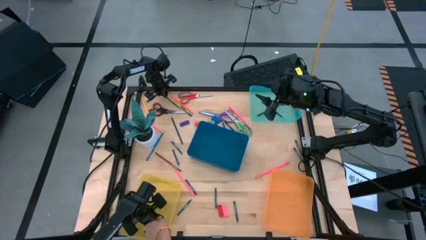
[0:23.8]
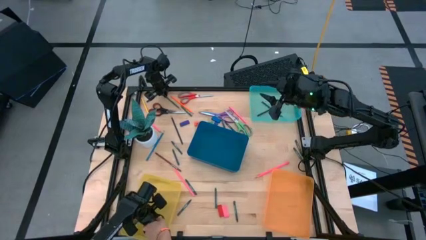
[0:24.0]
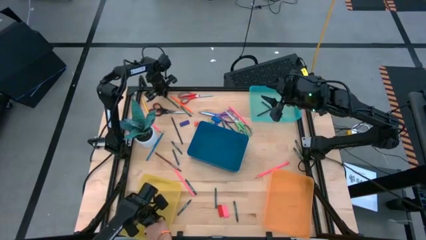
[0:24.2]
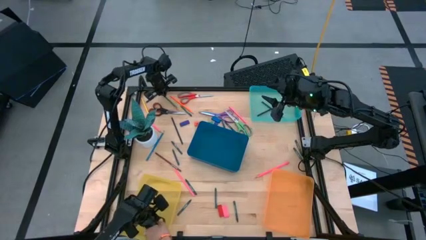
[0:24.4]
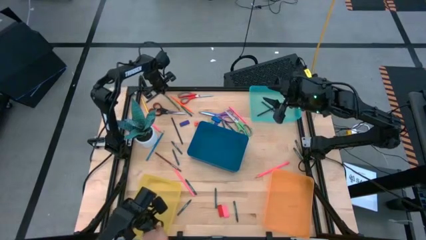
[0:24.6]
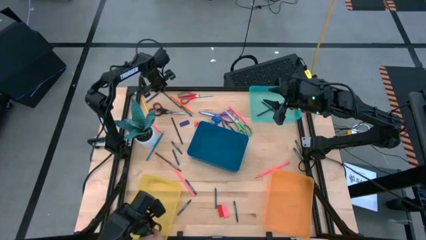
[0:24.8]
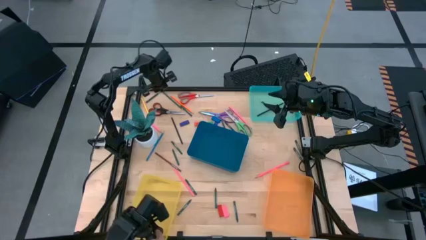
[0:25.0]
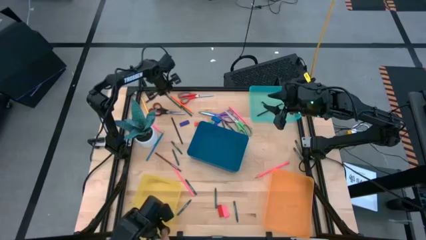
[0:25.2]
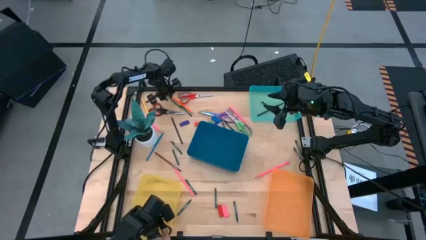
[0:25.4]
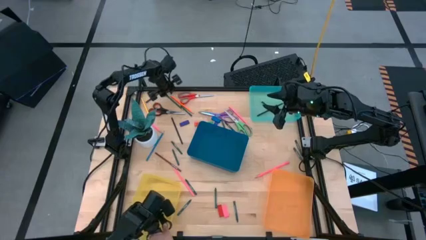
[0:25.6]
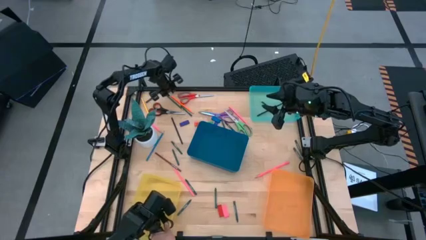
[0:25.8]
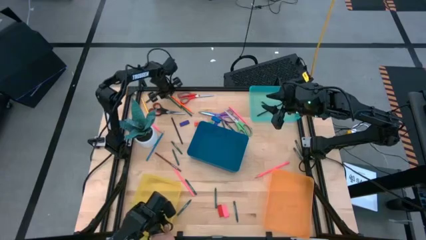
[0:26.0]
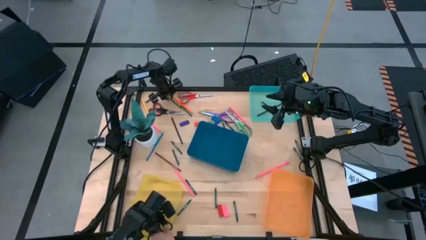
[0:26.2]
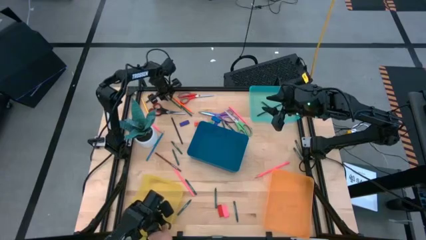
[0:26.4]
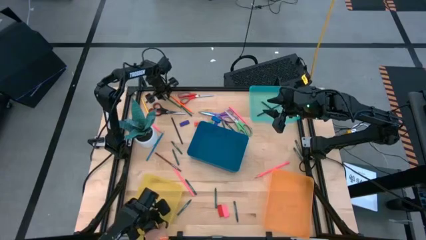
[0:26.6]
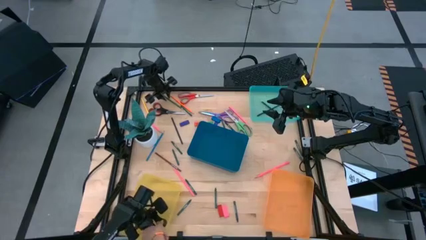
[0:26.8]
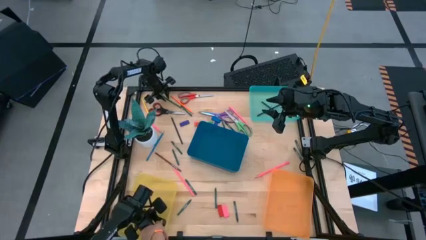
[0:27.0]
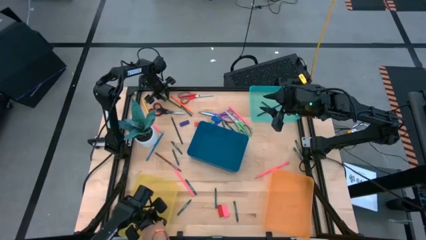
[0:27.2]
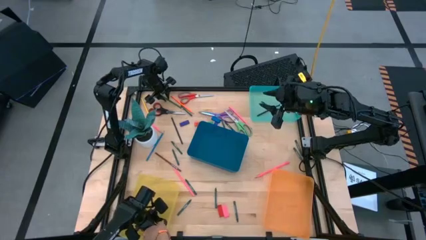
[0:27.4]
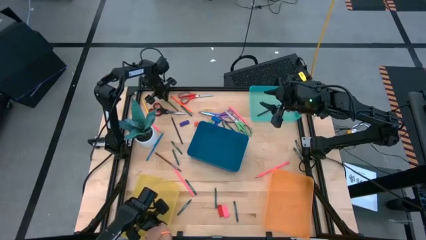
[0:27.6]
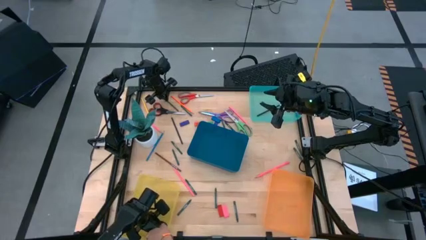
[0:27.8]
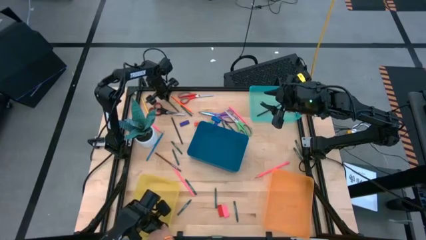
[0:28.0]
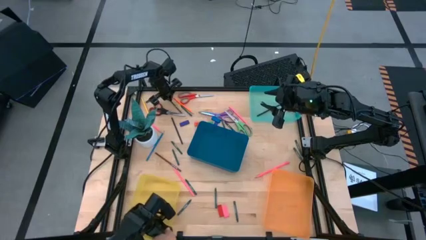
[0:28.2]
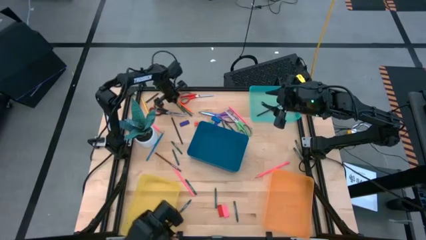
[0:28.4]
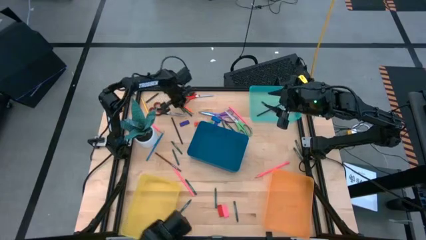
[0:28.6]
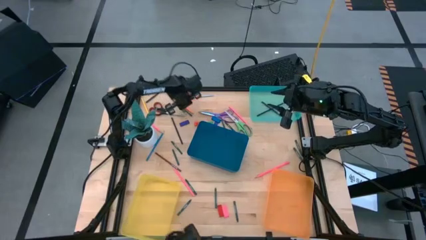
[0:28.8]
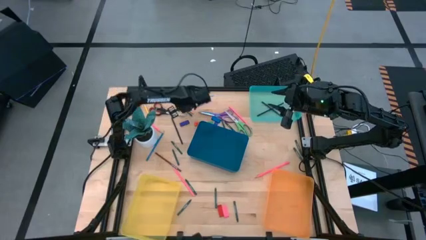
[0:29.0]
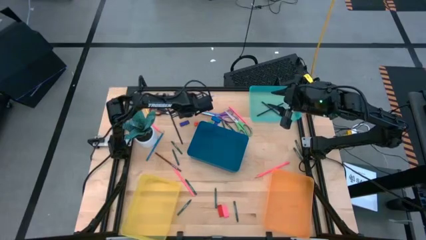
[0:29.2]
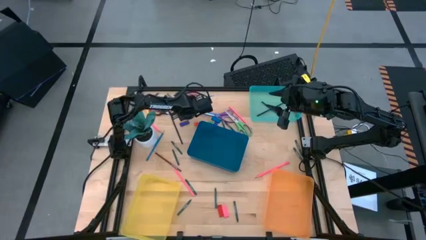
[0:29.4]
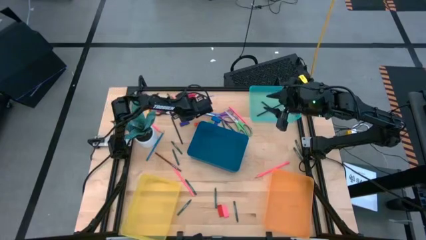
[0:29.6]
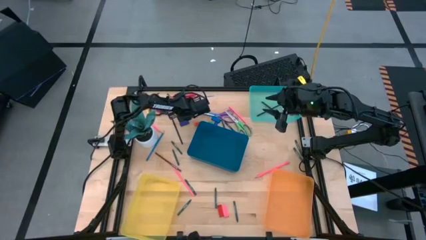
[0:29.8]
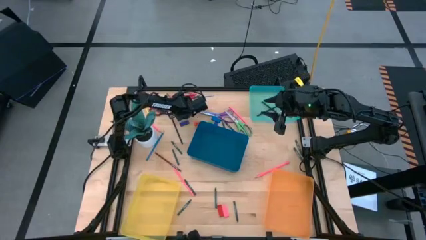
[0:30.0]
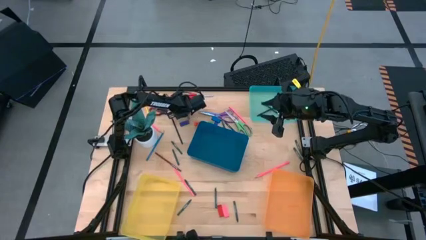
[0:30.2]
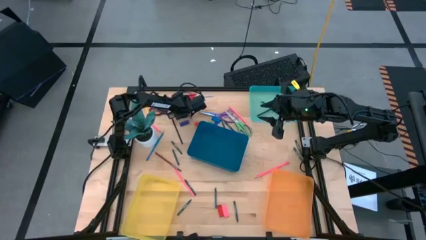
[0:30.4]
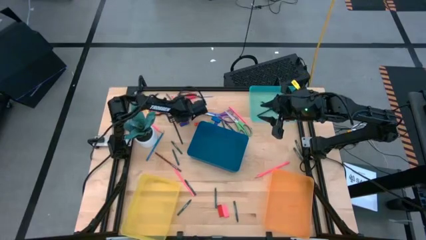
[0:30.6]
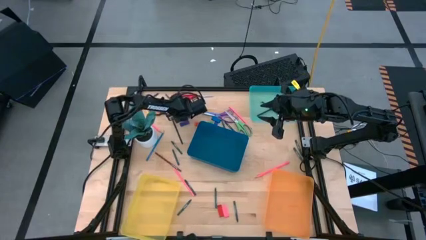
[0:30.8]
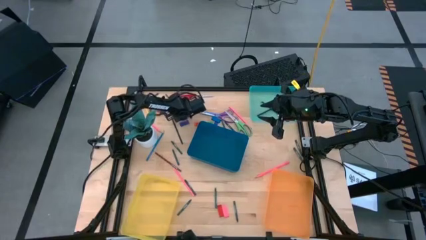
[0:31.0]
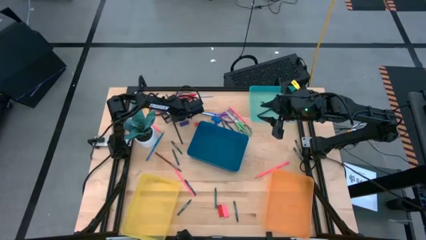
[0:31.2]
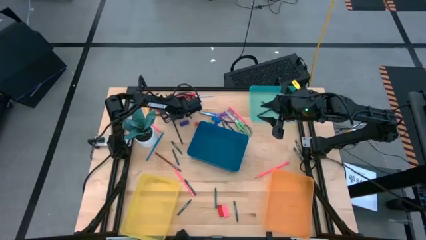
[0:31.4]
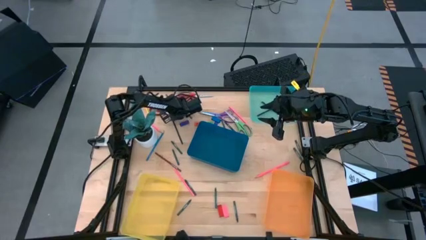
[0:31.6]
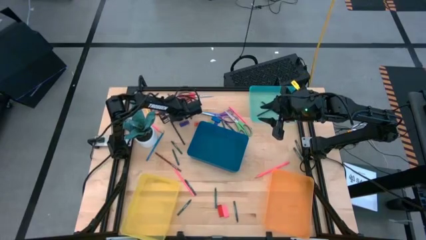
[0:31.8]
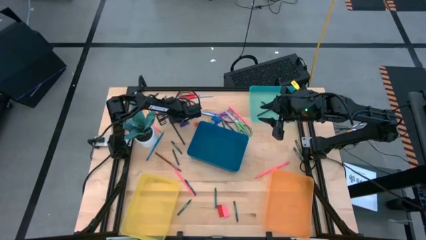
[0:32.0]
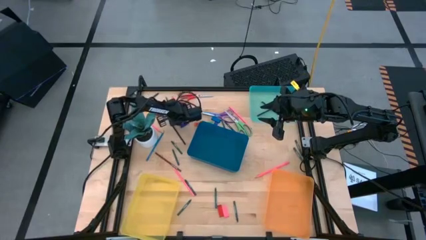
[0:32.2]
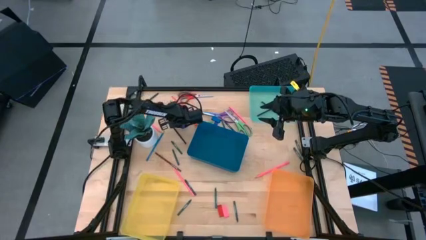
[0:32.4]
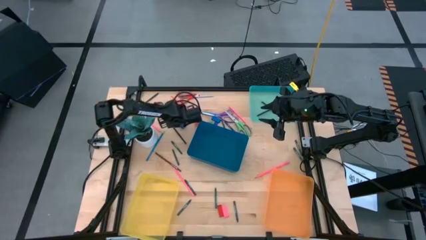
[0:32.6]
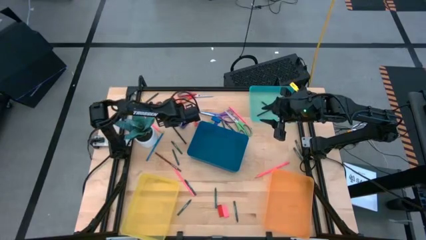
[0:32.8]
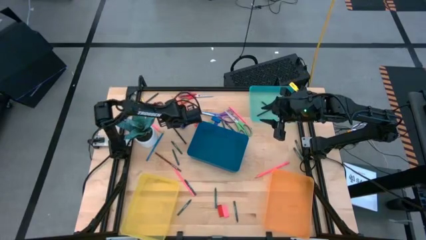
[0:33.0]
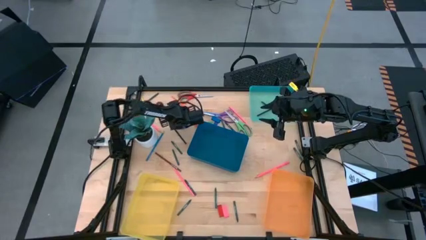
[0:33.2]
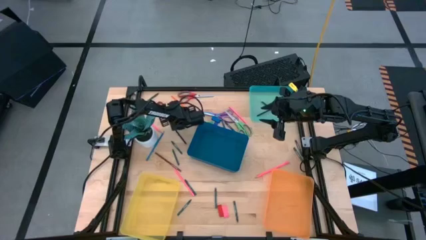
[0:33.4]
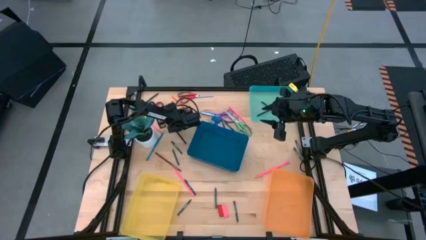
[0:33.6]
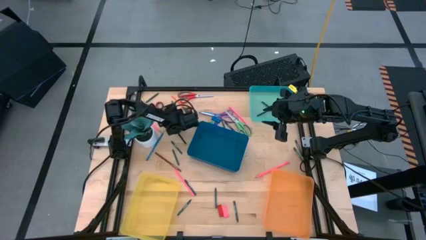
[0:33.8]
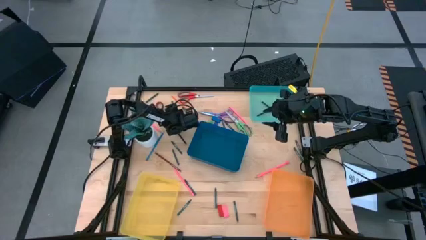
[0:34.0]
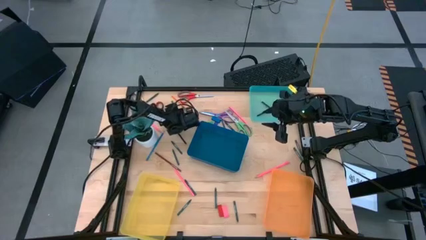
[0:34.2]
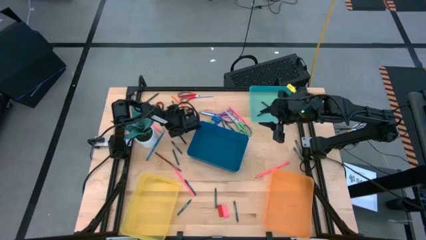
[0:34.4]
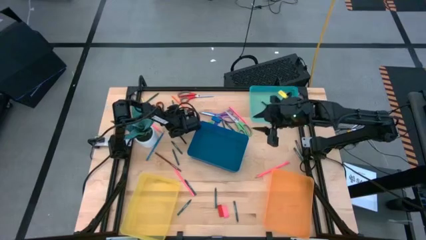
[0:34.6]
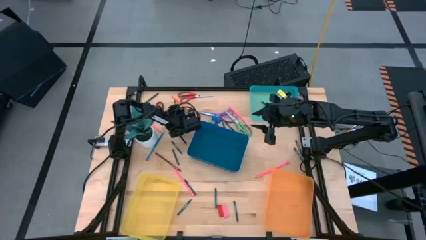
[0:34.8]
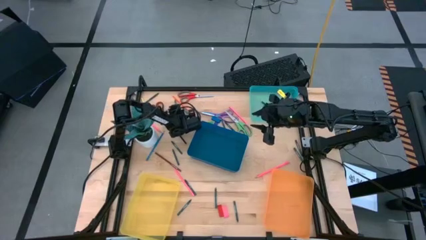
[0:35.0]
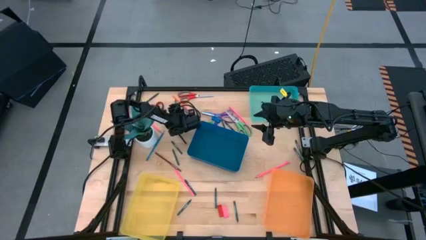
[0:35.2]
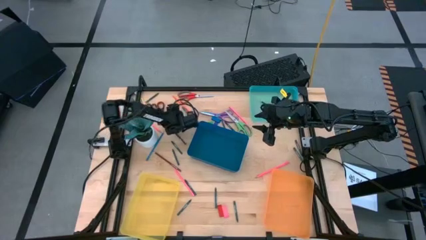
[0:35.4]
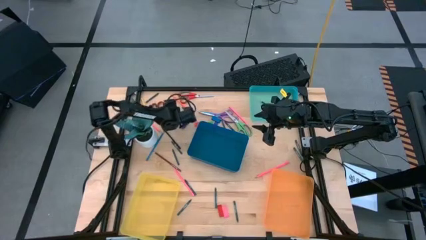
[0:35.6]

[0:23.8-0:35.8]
Task: Sort crayons/erasers/pens/pencils in bins
Put the green pencil into the green bin
